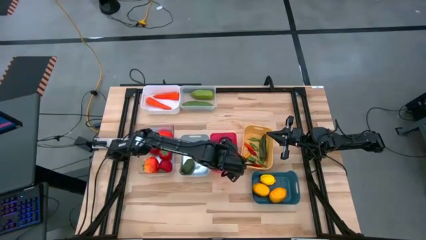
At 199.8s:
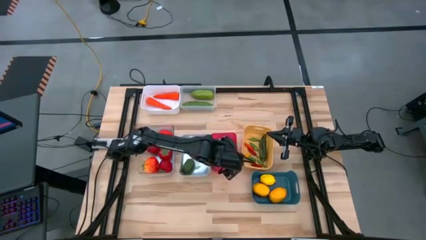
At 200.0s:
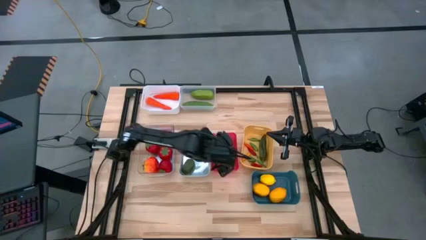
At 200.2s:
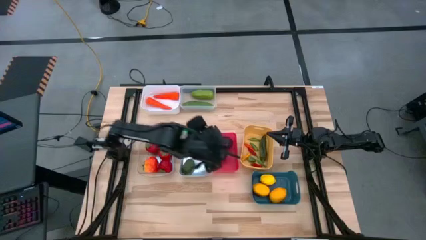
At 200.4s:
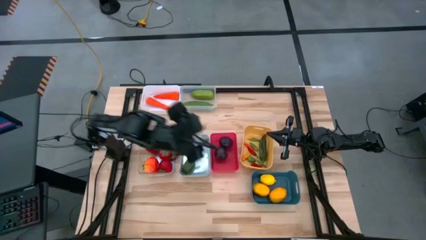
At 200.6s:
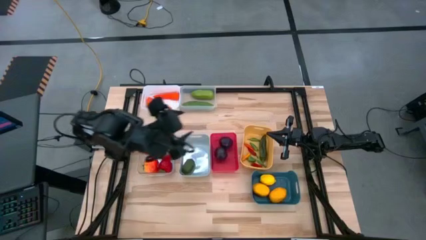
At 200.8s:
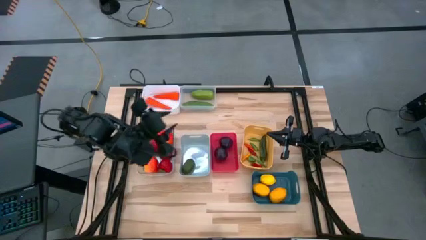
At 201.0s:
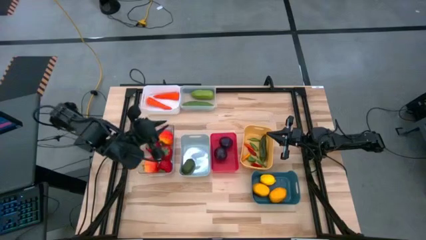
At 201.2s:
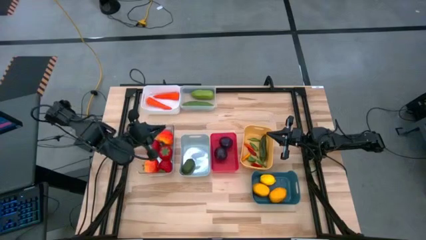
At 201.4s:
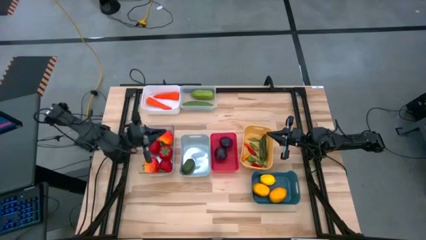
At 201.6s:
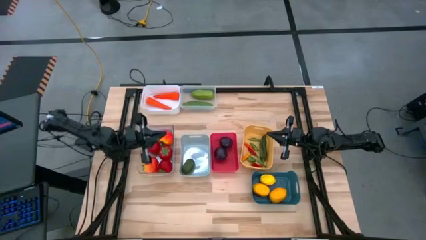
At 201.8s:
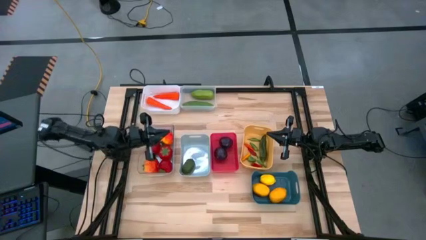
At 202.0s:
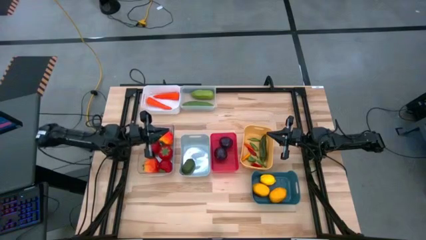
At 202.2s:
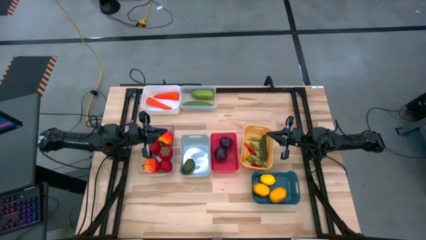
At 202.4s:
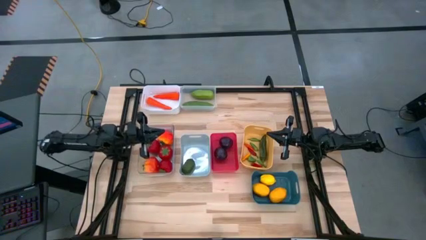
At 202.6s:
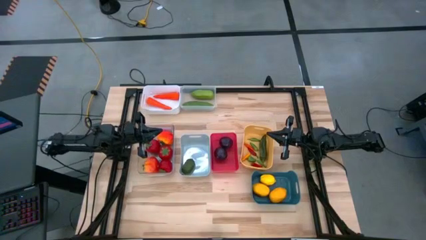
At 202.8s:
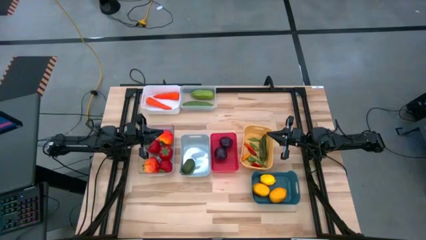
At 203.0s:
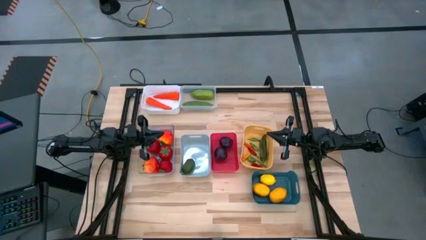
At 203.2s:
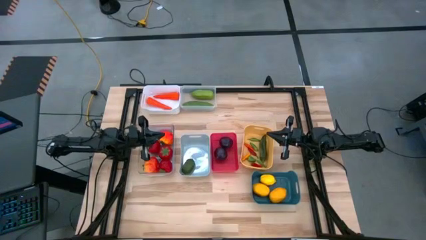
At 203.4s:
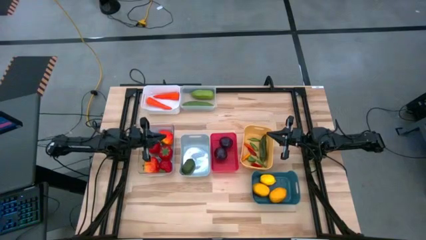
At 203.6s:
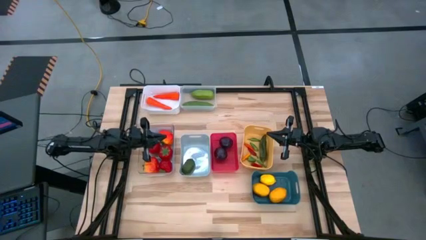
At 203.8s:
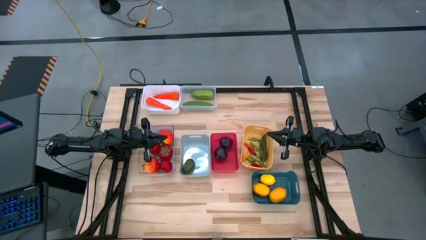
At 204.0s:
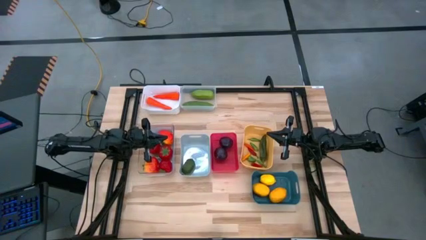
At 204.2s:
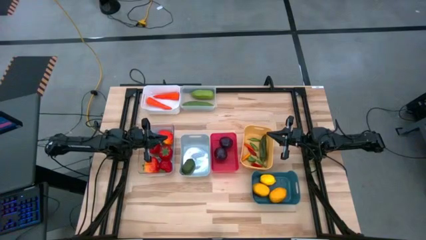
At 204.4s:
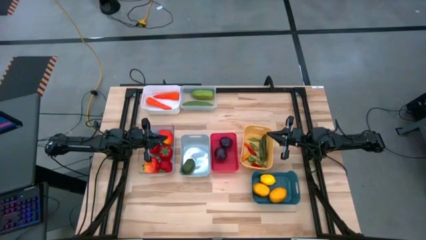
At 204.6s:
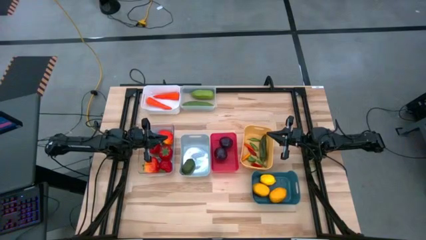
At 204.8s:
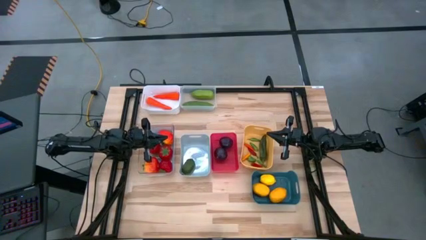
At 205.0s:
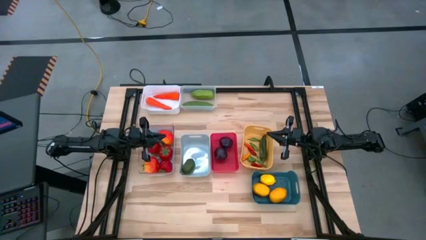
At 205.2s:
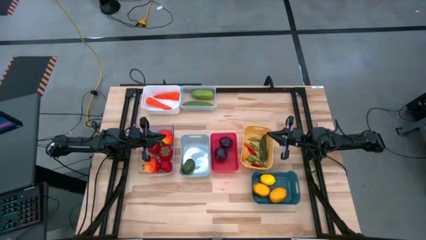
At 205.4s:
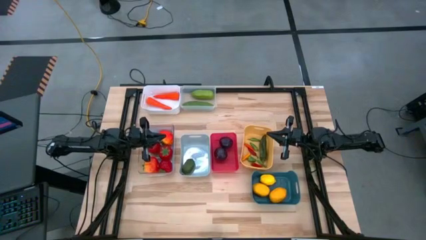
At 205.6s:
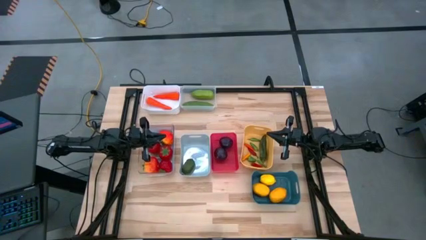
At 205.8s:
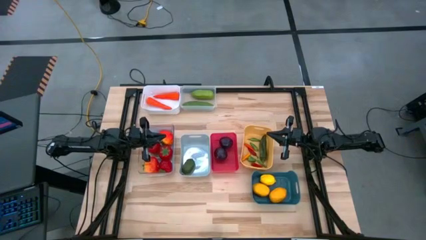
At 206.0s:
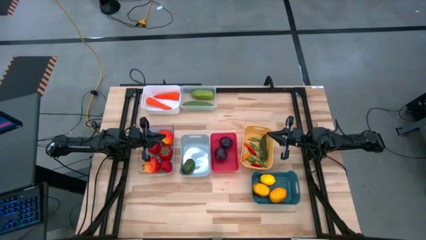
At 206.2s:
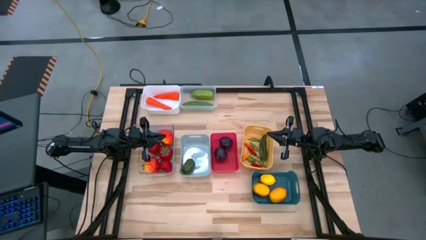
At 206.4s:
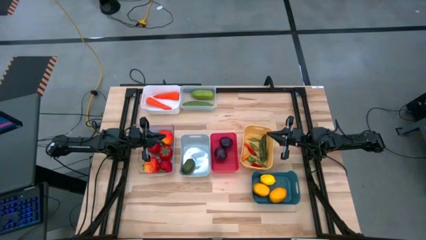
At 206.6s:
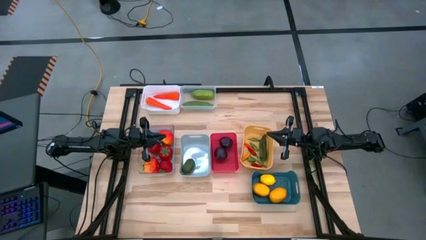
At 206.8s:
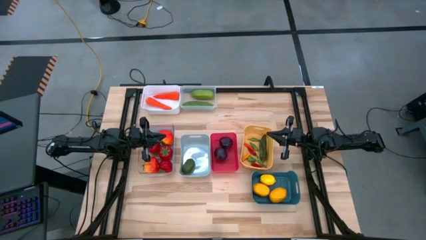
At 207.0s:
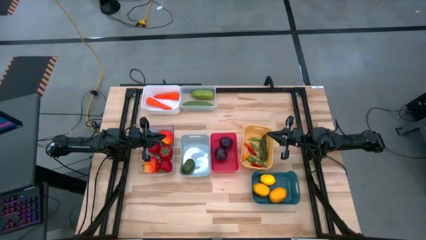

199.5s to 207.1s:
Task: Sort produce into baskets
Return to Home Position

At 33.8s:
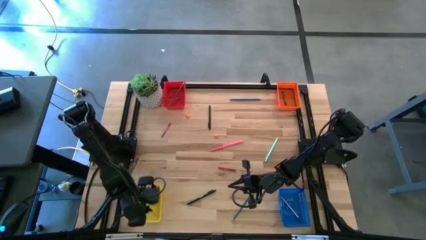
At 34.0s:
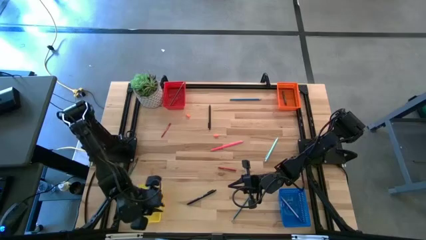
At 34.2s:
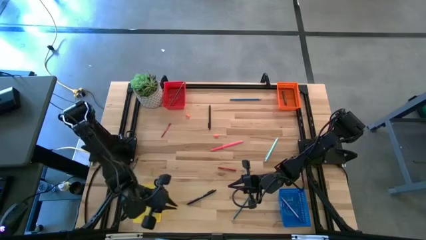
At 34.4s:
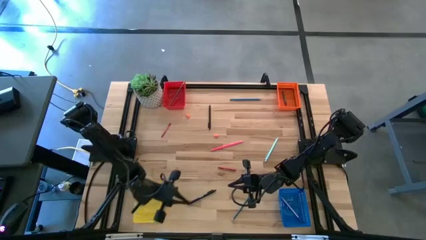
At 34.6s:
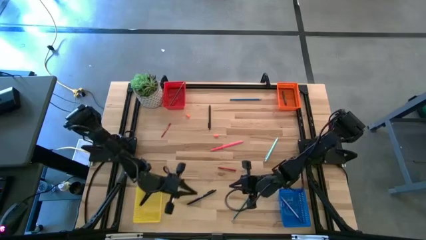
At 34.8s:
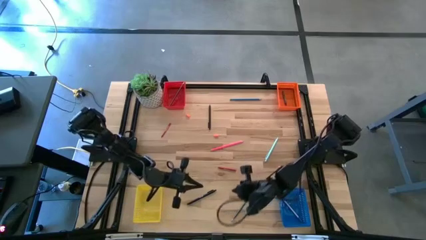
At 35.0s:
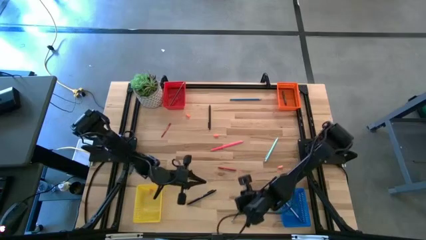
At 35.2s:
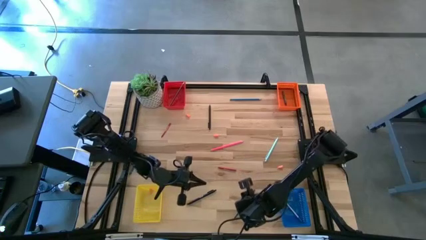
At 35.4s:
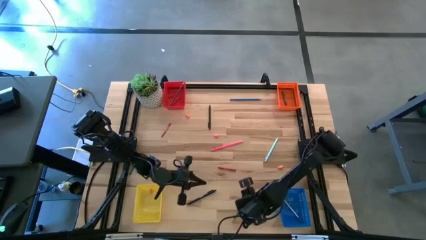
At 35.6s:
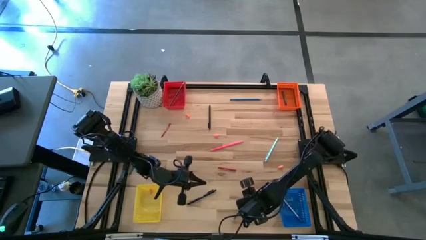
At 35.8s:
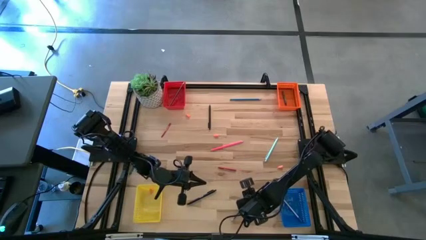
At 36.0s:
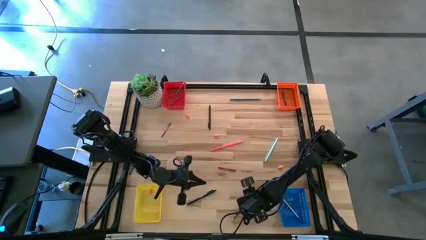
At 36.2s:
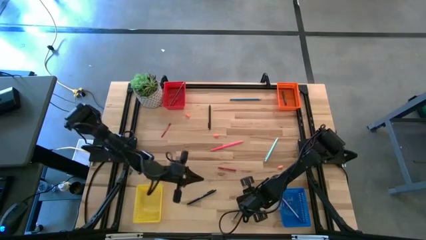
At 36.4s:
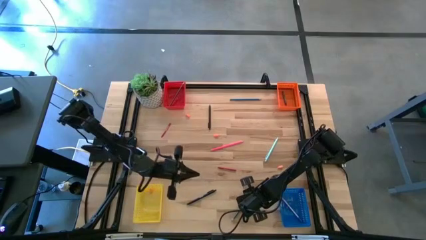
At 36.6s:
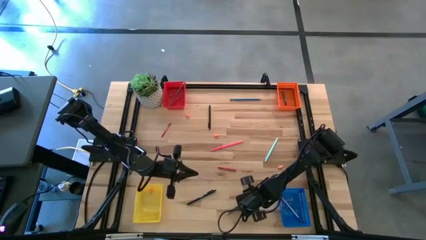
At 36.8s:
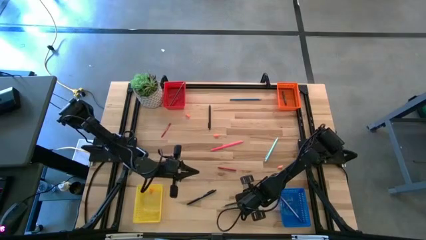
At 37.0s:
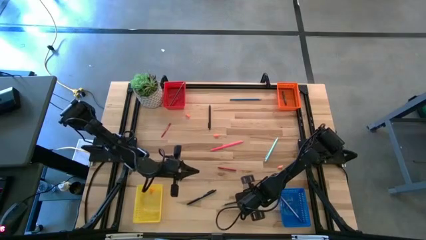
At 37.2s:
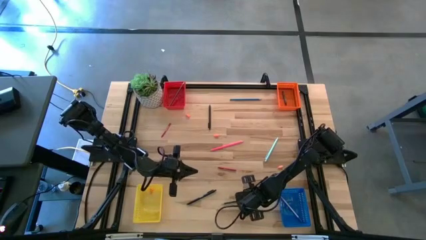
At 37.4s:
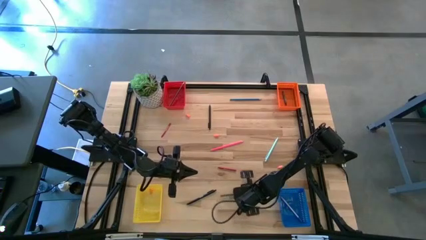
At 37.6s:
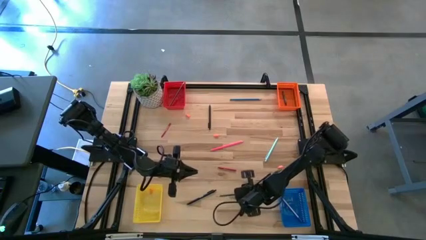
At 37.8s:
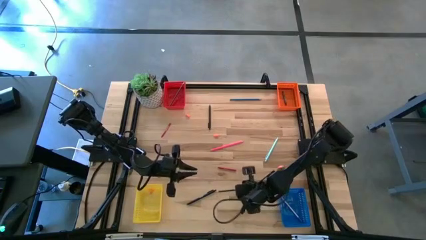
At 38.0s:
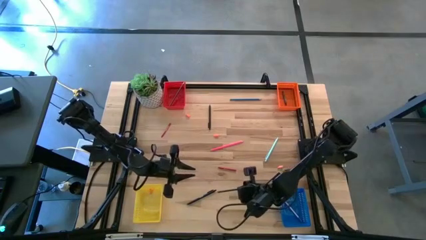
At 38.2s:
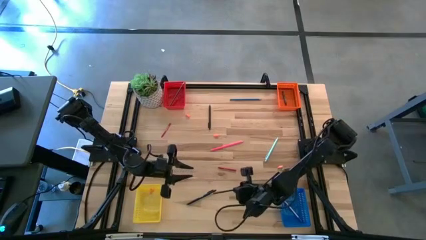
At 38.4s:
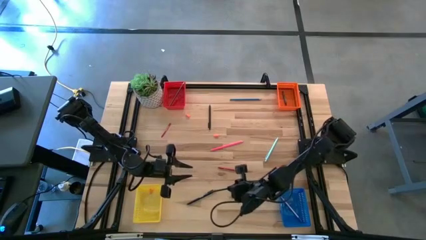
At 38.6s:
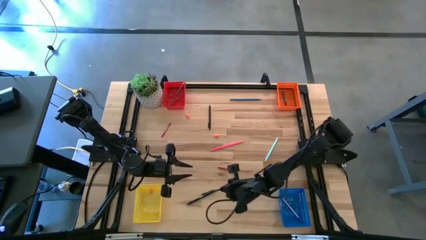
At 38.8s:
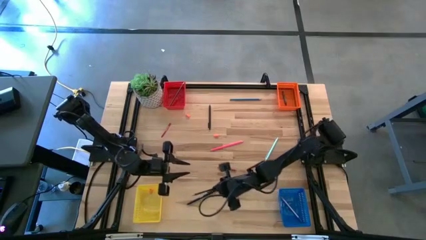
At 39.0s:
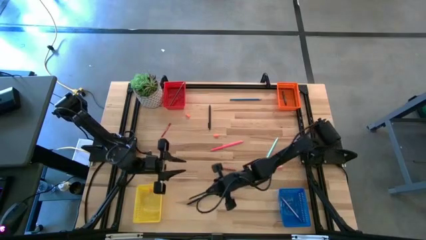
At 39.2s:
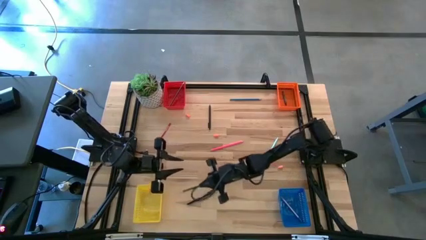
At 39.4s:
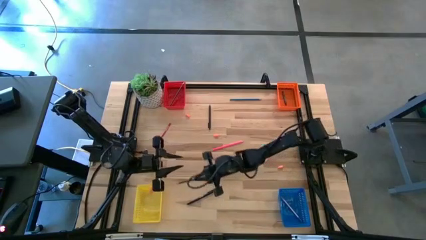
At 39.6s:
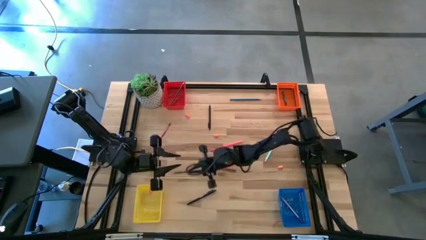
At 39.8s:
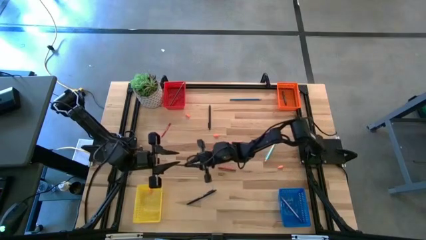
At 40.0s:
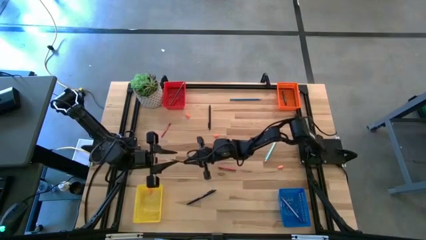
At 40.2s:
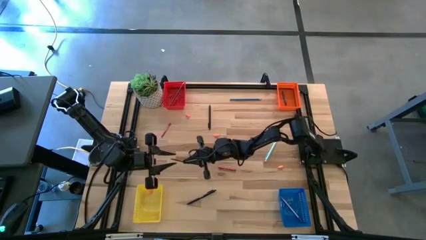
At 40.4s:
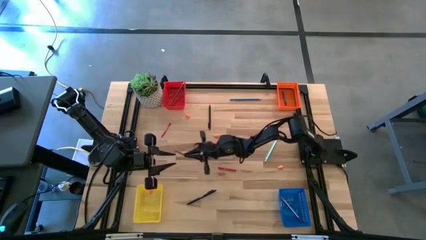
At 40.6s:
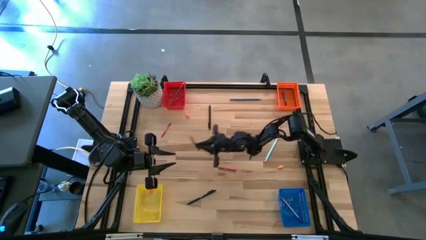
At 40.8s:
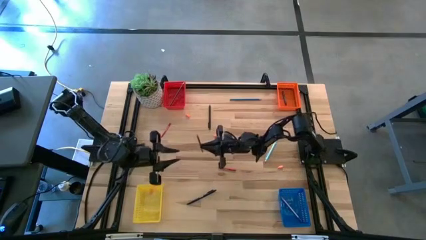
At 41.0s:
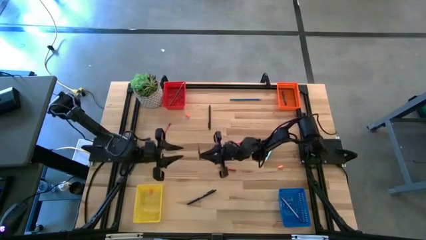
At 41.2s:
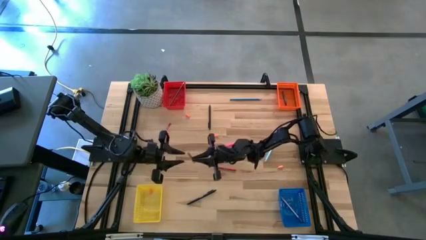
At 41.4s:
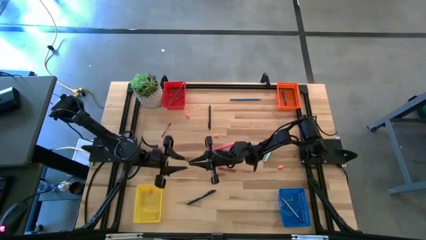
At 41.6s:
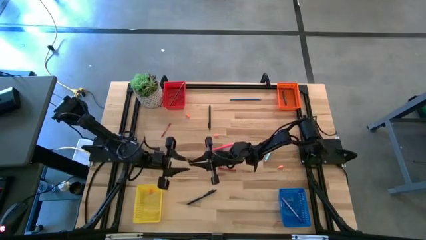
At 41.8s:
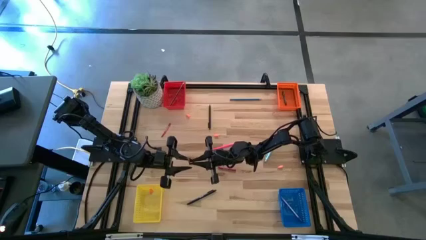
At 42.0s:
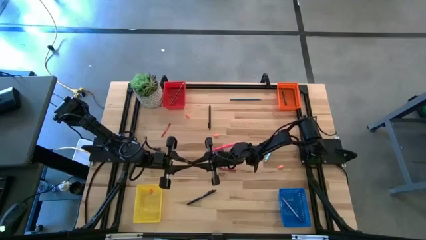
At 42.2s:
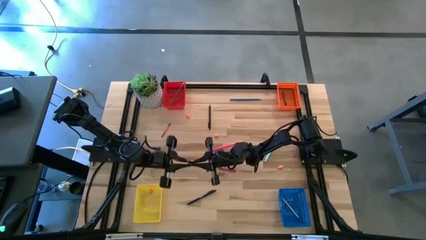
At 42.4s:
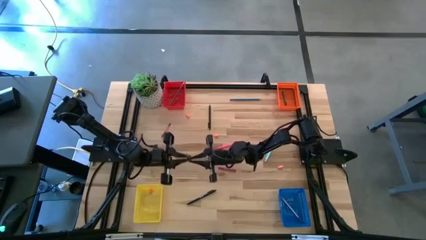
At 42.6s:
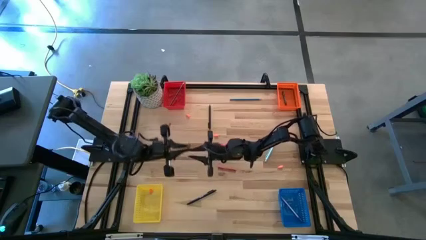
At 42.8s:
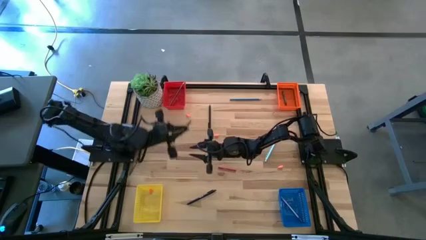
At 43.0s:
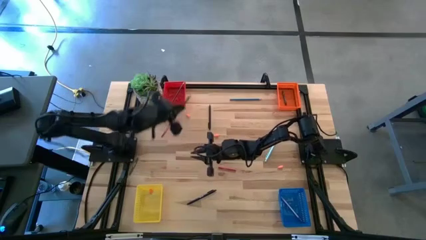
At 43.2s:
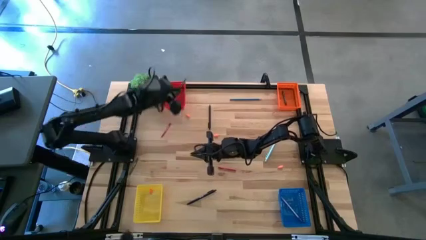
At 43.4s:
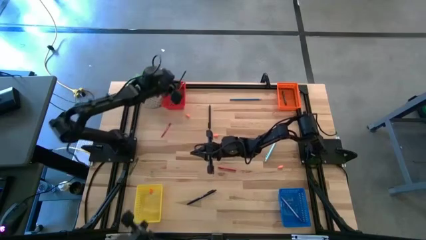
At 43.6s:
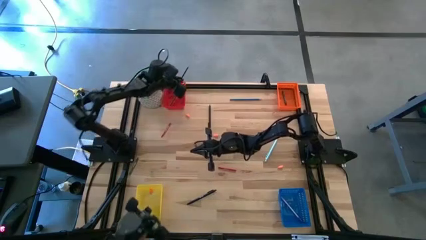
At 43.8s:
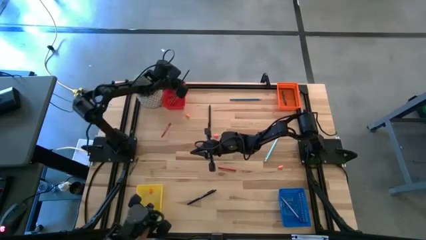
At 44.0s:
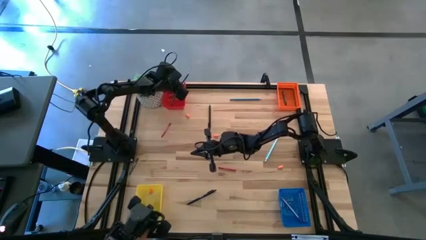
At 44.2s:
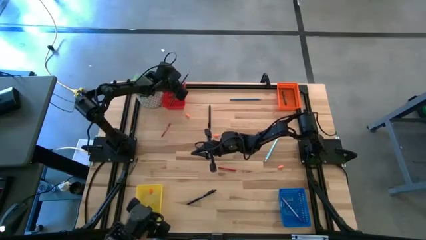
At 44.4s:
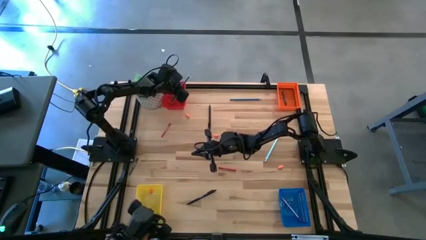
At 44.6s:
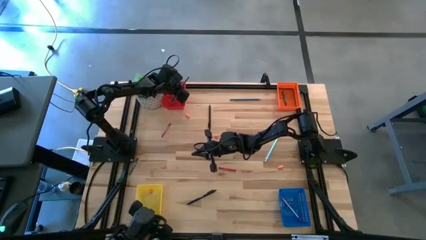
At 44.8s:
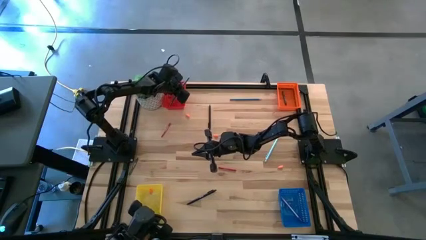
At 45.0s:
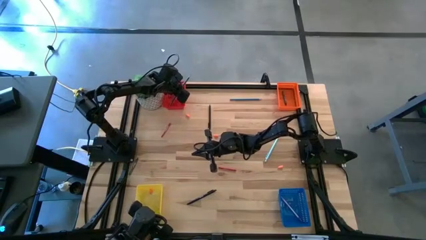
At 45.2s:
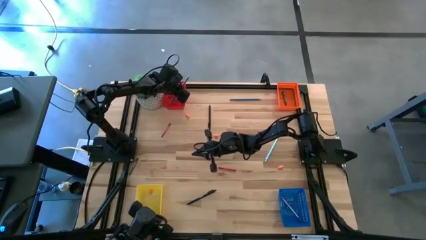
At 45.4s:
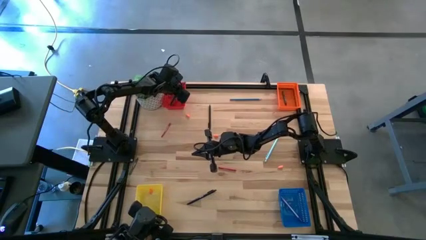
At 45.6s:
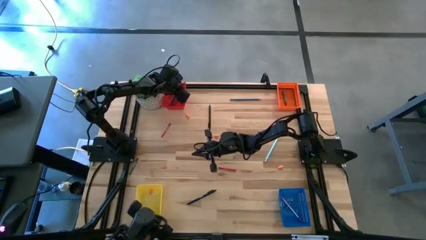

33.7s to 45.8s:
Task: Sort crayons/erasers/pens/pencils in bins
Put the green pencil into the red bin
